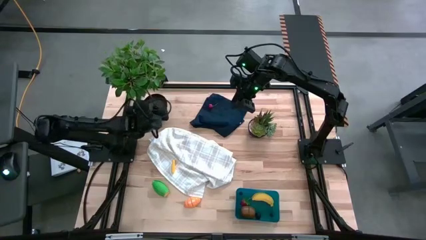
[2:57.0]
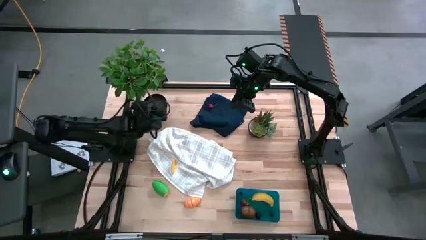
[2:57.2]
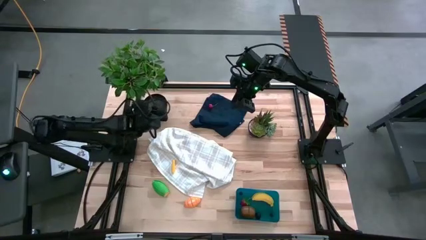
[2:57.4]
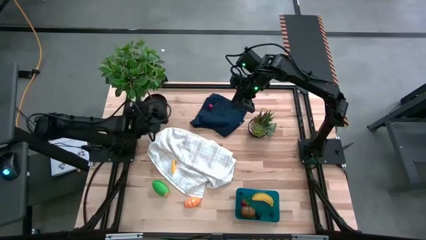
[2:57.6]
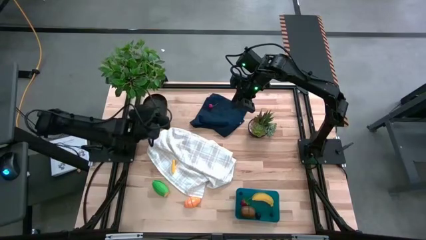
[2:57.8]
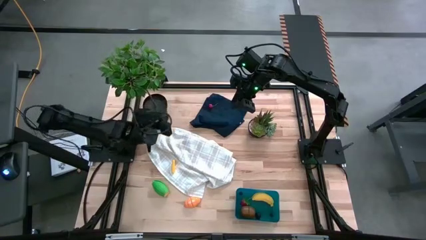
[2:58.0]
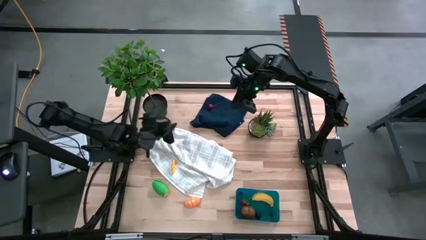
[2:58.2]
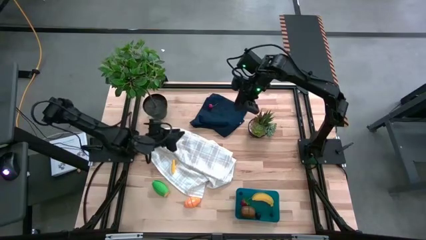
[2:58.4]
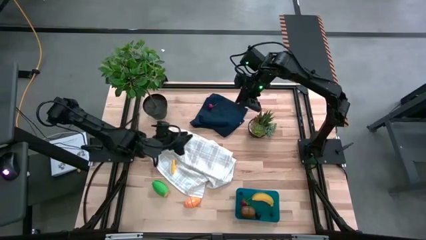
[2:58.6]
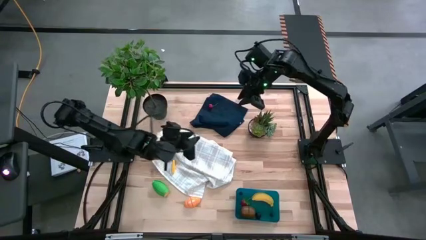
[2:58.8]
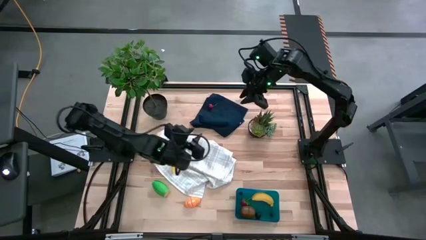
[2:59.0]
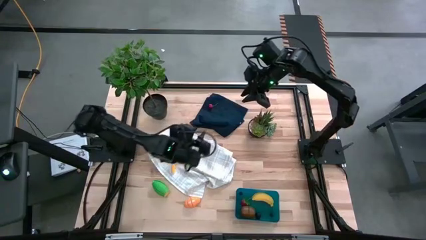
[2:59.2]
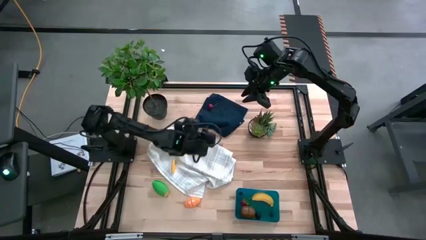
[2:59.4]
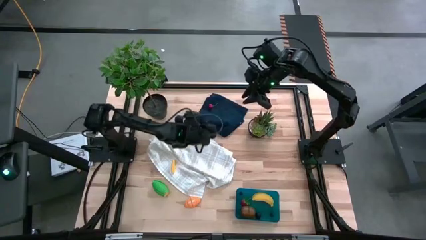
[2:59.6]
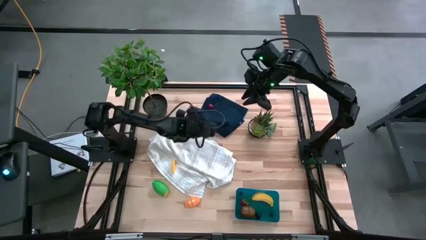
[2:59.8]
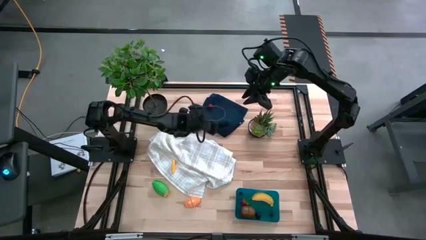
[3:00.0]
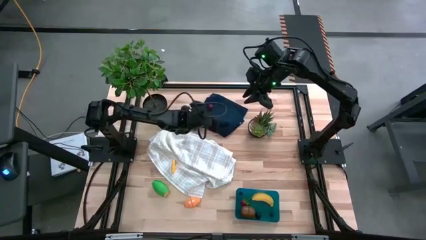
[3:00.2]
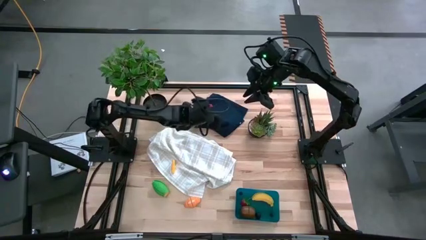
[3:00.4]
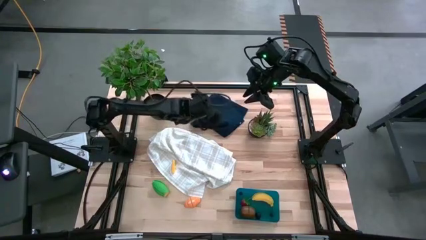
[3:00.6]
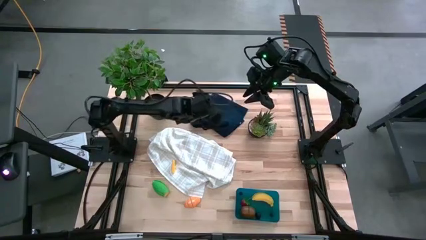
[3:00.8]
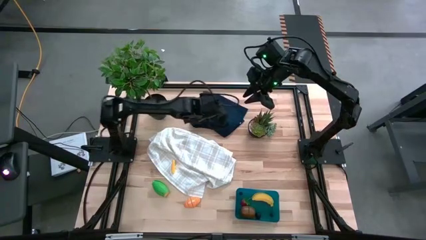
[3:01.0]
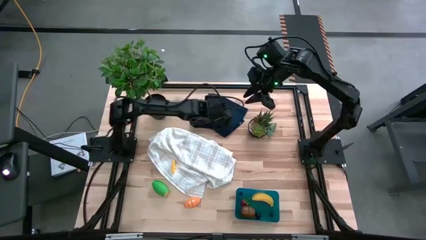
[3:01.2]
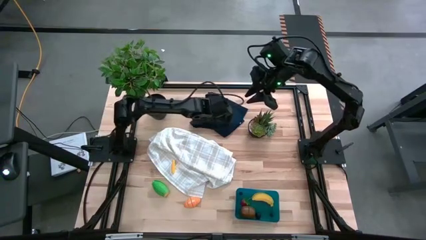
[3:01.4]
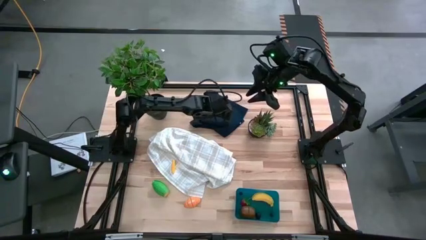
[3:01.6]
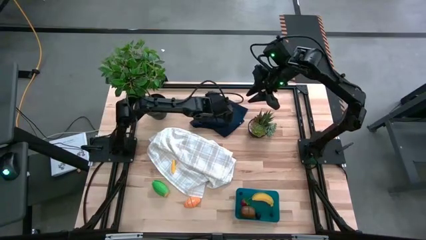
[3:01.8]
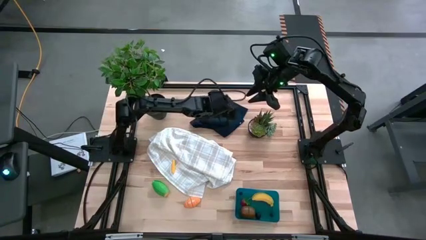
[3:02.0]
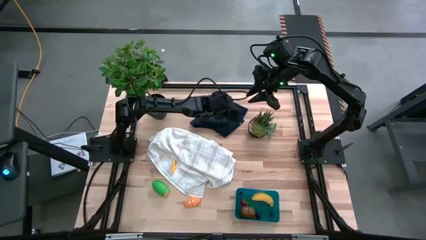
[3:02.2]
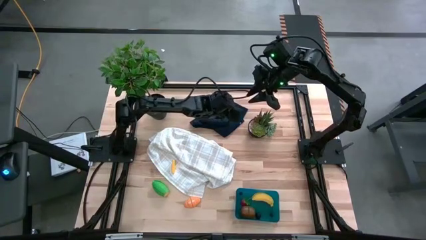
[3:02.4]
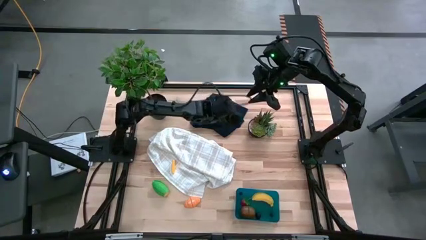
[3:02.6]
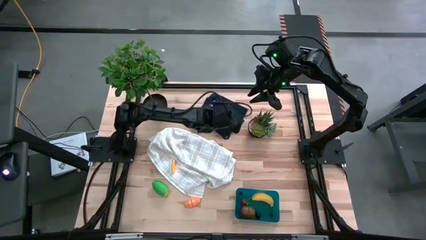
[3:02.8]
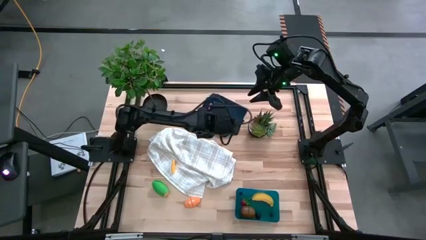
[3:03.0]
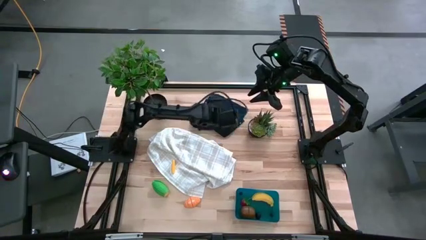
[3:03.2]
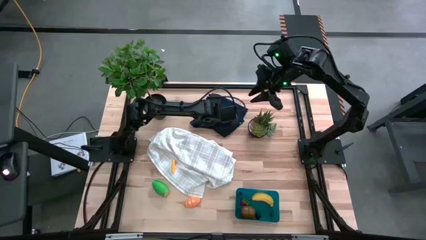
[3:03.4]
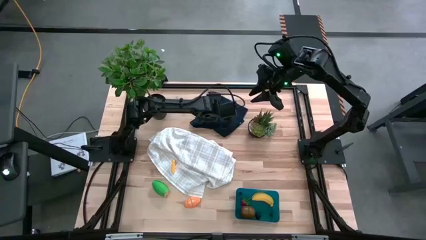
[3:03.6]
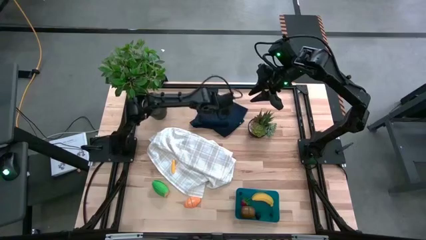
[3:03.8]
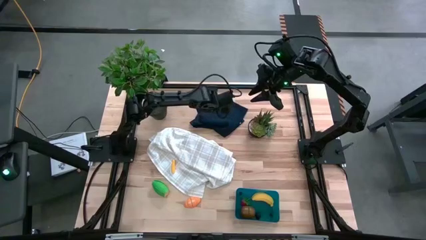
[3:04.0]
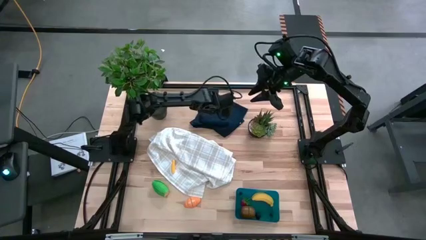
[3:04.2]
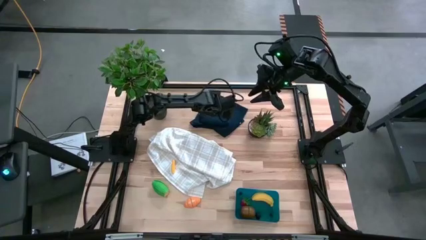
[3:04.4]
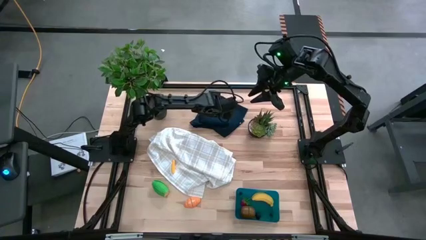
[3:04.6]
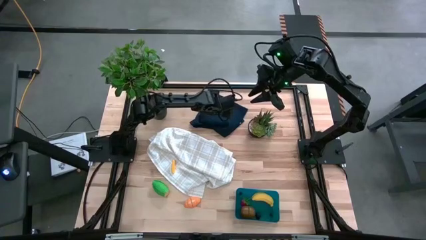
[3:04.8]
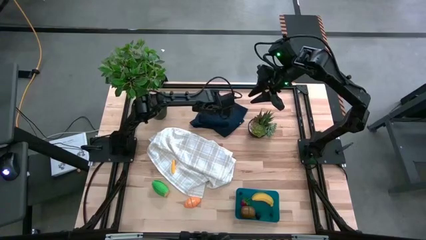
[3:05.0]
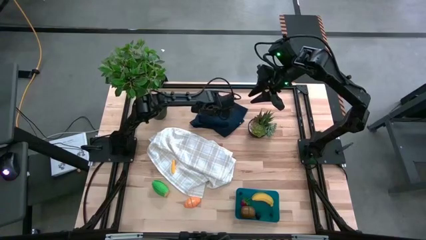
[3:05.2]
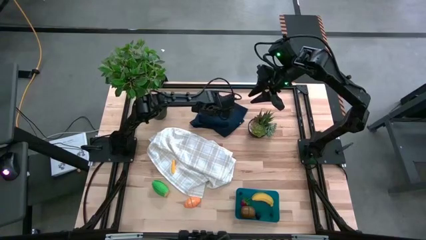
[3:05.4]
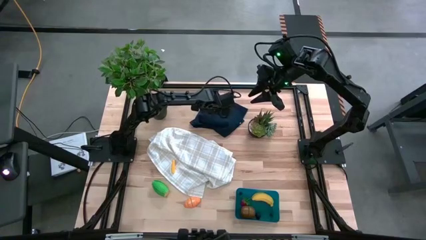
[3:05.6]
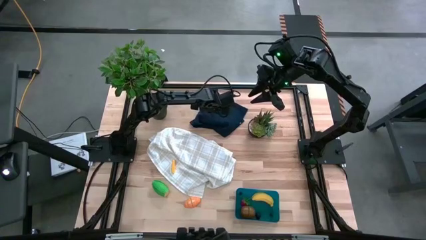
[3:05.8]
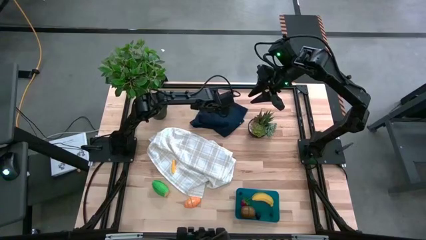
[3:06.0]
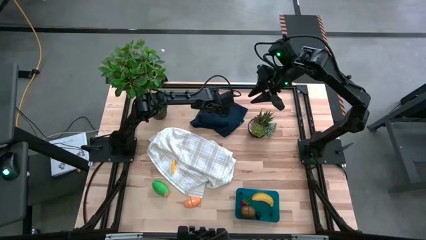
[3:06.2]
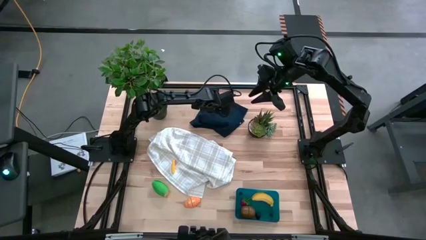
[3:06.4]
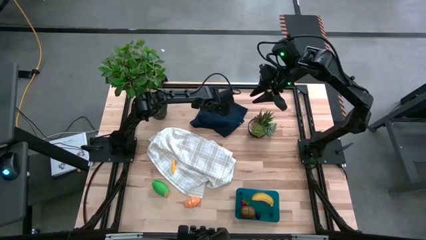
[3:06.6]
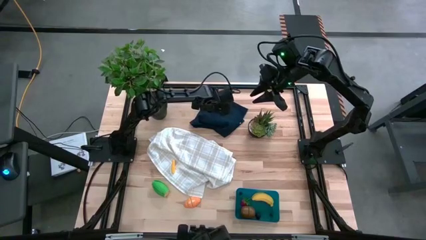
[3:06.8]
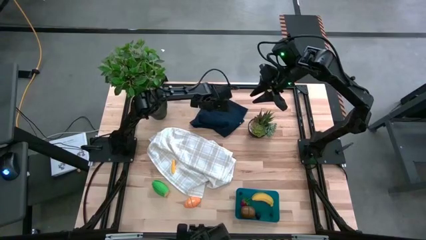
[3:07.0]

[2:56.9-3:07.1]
Task: Pick and placing Produce into tupperware
Put the cherry into the bin

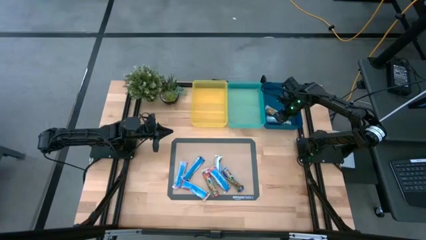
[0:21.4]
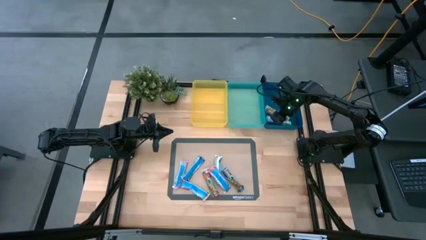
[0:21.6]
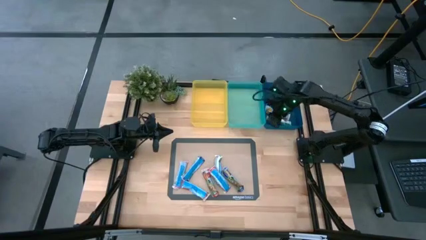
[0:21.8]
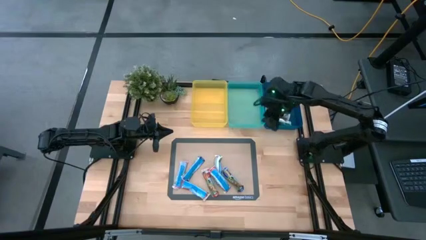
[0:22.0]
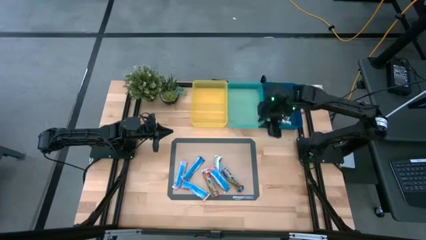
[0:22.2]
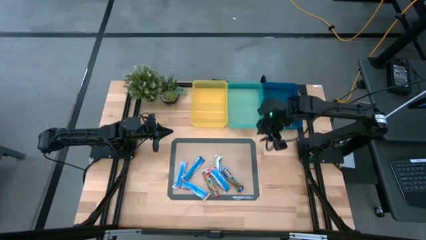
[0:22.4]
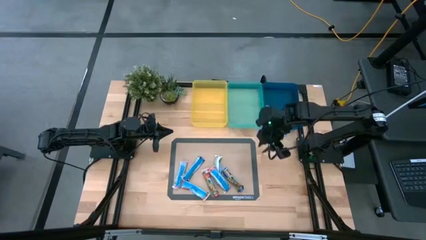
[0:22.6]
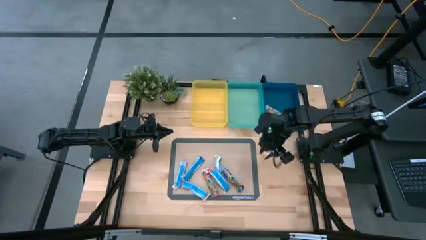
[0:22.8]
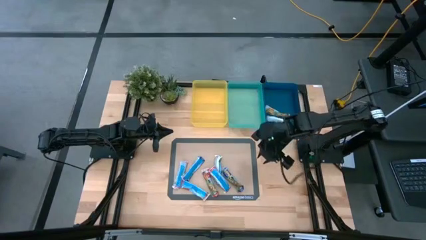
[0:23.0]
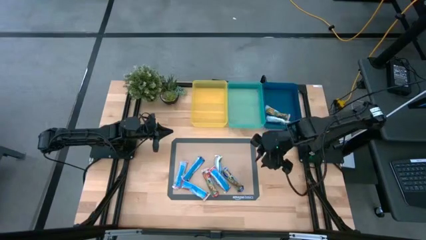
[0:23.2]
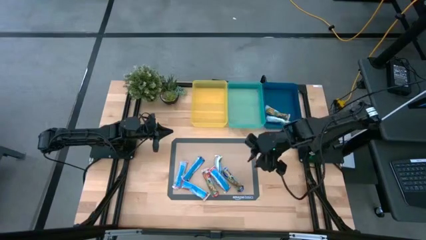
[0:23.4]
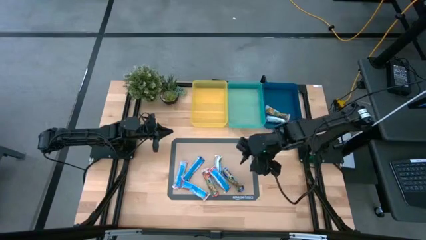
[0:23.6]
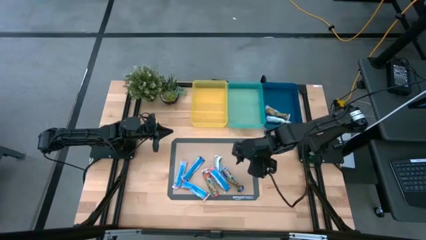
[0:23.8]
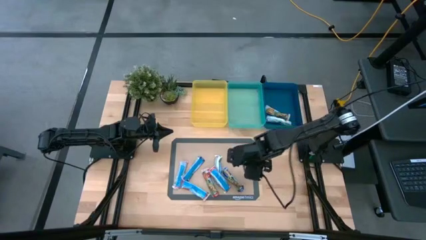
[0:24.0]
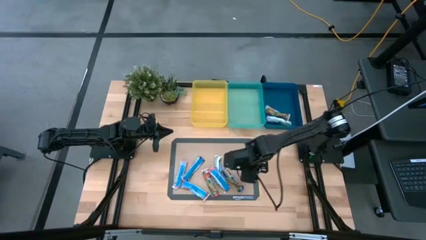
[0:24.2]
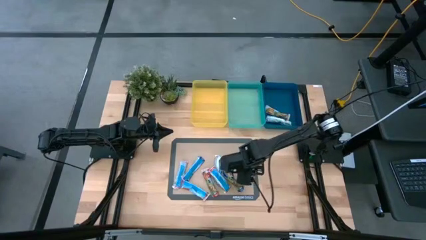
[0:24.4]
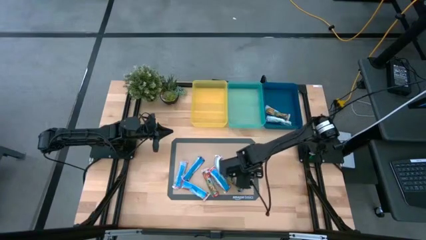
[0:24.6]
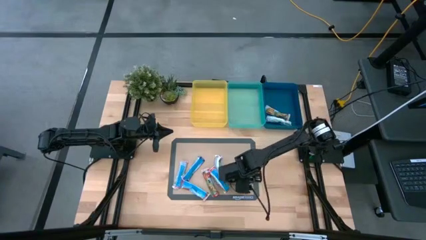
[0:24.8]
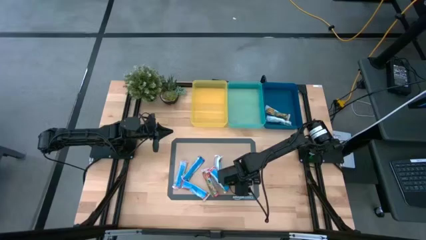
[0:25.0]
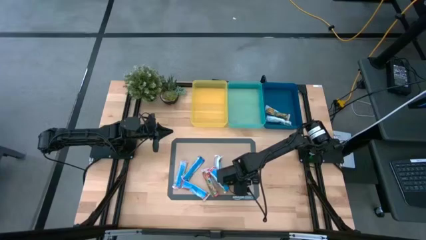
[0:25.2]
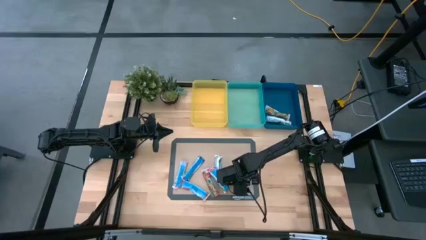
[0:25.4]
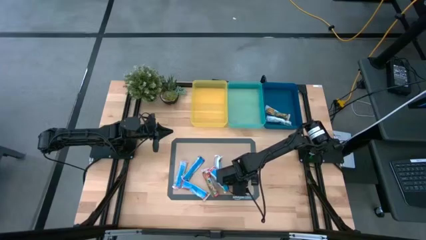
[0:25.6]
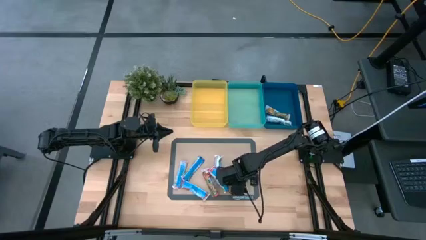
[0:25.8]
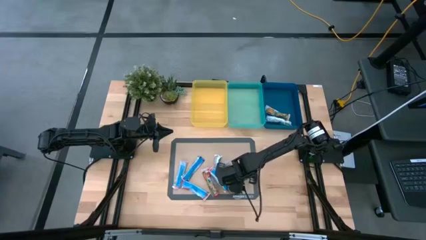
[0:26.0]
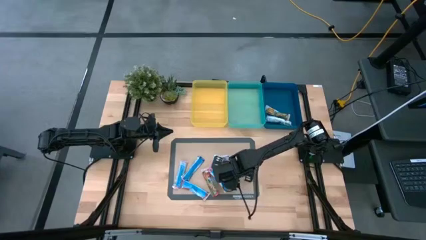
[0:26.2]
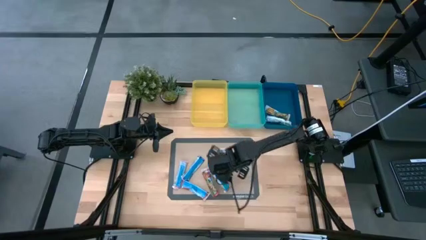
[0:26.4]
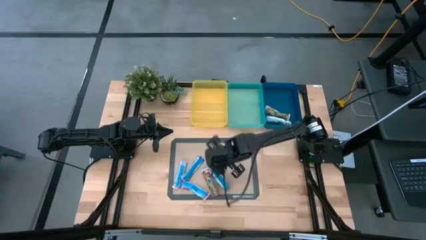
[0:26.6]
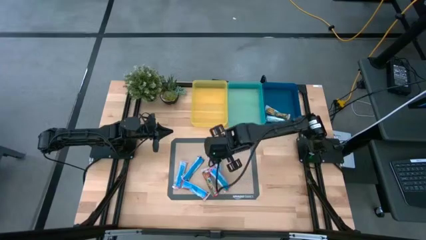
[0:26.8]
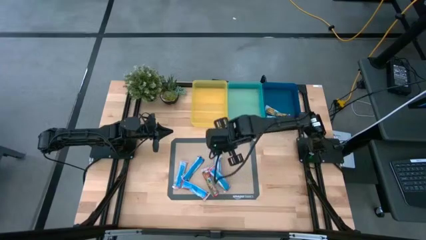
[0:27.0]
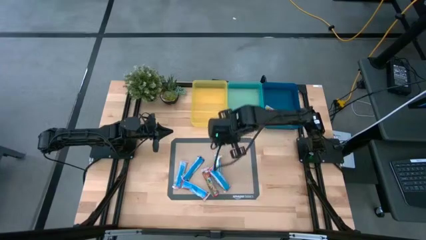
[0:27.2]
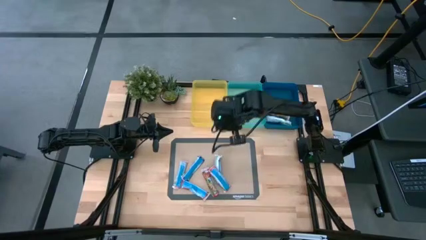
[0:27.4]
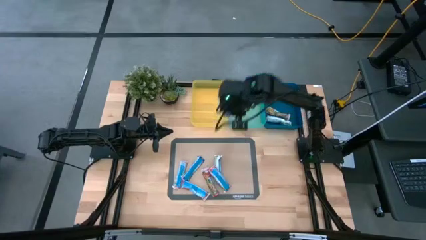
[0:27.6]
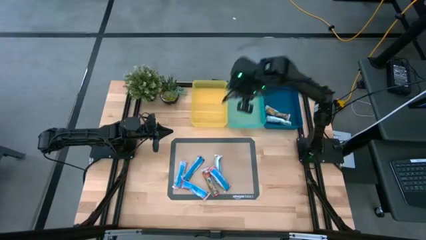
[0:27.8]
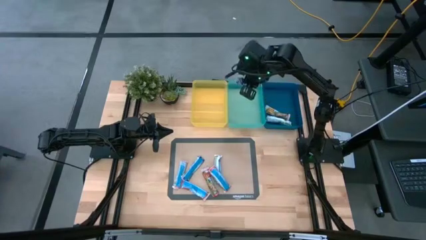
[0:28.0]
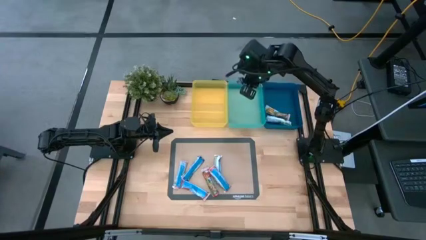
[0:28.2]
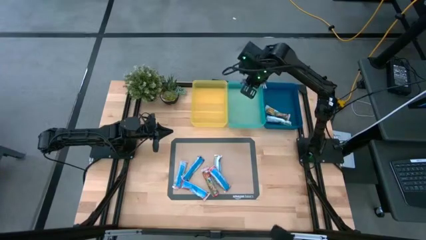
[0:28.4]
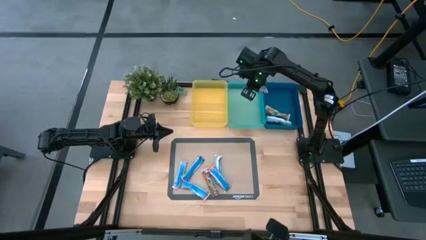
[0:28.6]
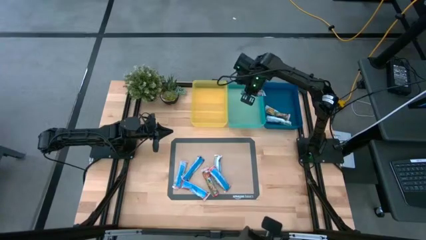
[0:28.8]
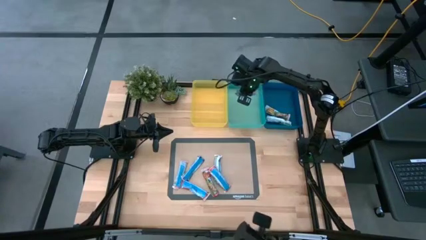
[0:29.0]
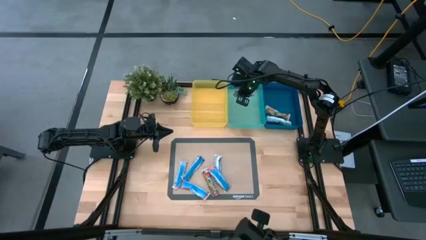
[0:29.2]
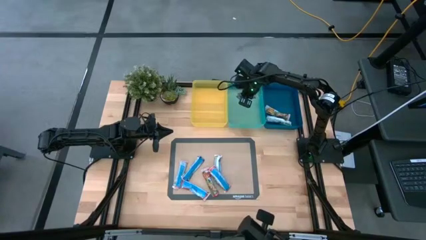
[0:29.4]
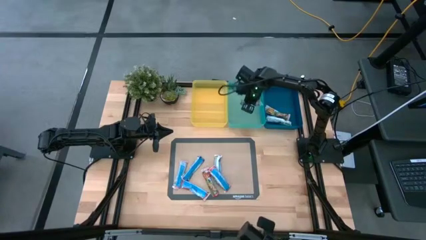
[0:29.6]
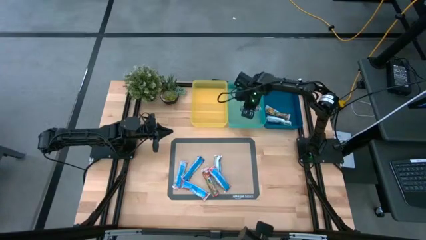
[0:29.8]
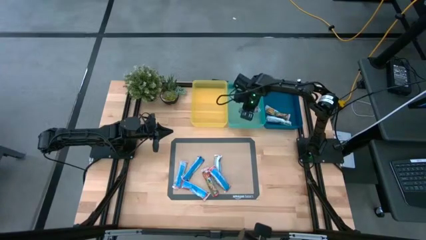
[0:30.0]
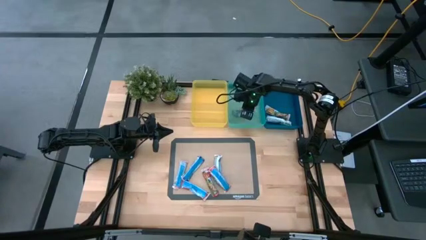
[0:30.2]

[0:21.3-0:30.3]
Task: Pick and place Granola Bars by type
Put the blue granola bar into green bin
